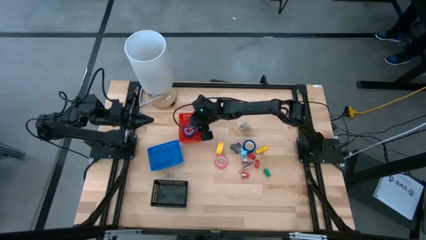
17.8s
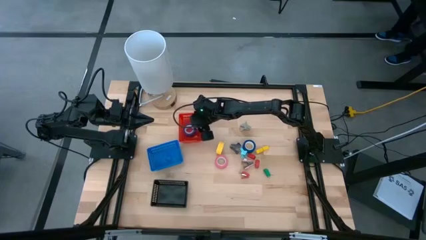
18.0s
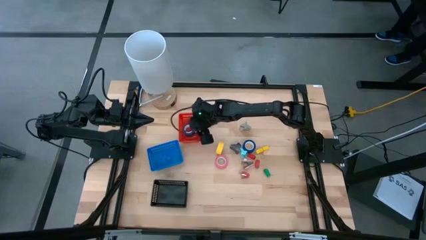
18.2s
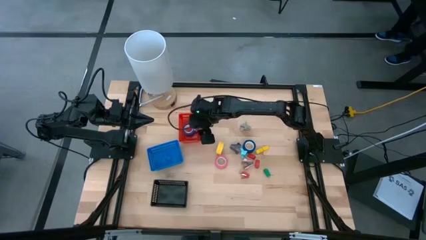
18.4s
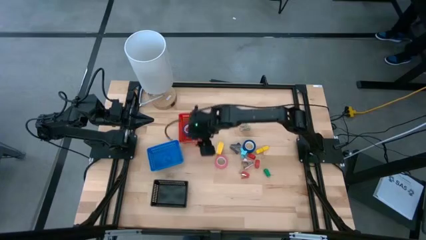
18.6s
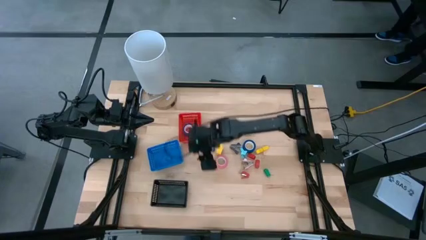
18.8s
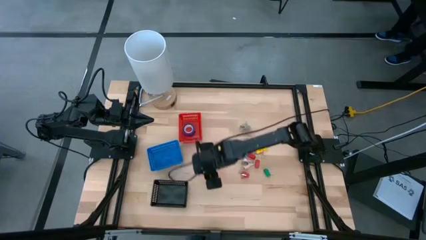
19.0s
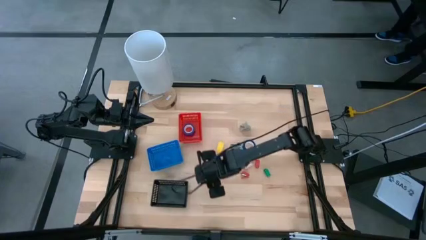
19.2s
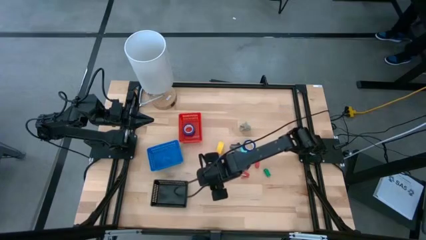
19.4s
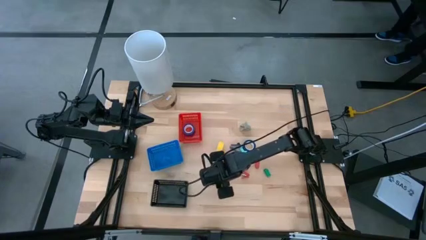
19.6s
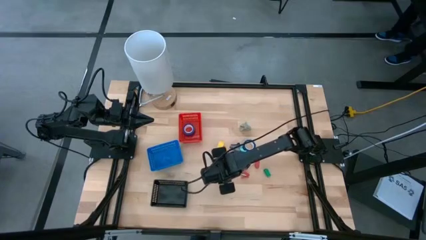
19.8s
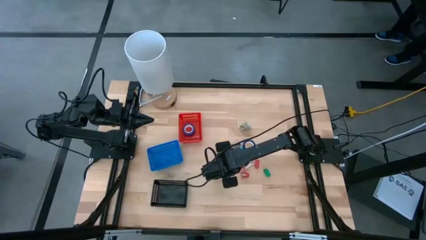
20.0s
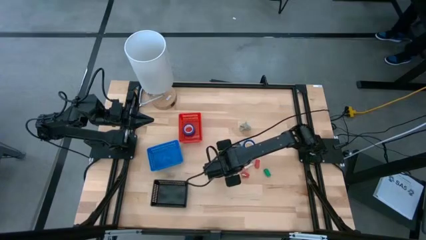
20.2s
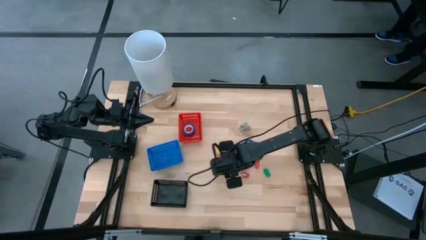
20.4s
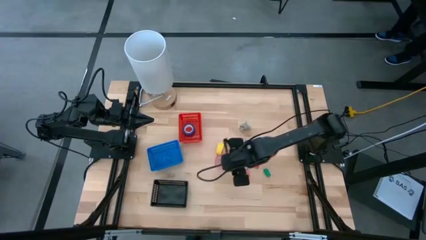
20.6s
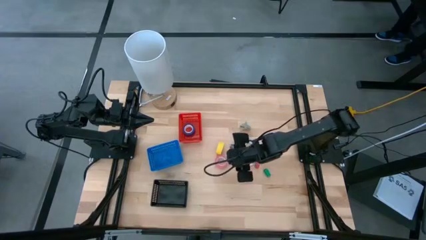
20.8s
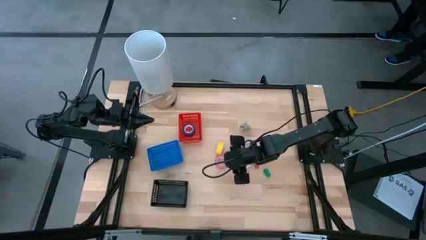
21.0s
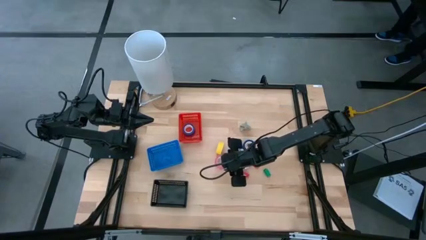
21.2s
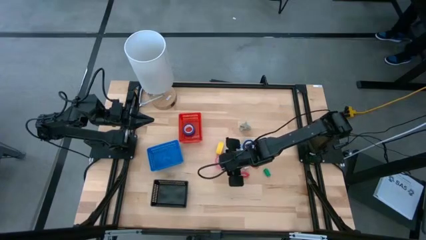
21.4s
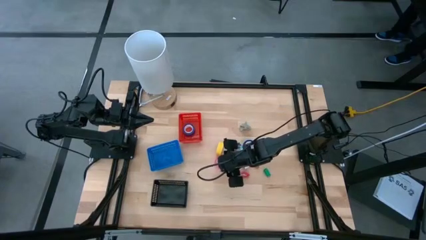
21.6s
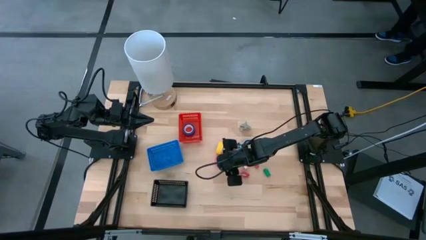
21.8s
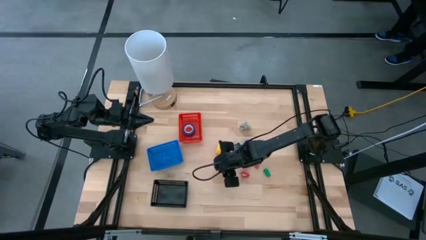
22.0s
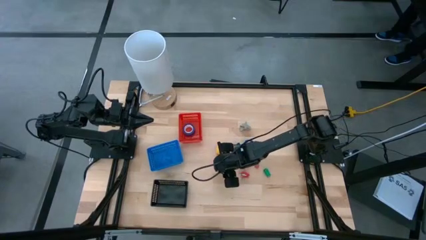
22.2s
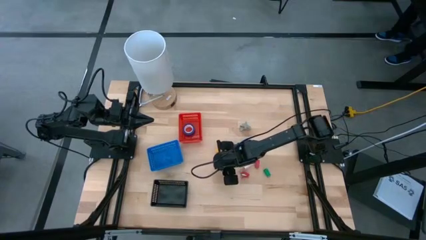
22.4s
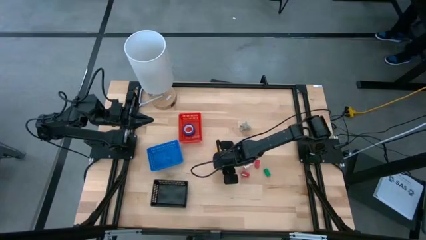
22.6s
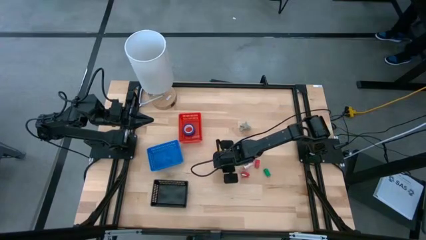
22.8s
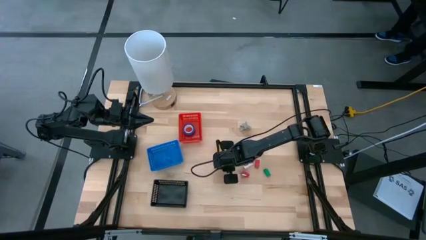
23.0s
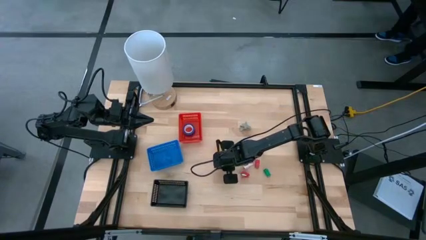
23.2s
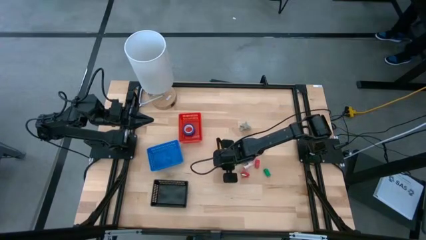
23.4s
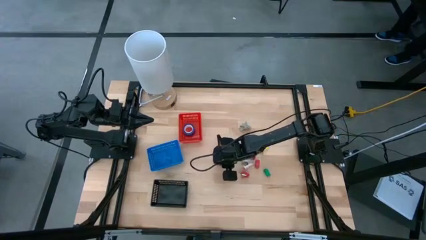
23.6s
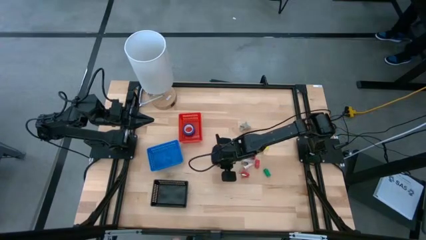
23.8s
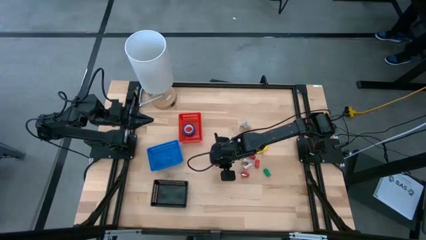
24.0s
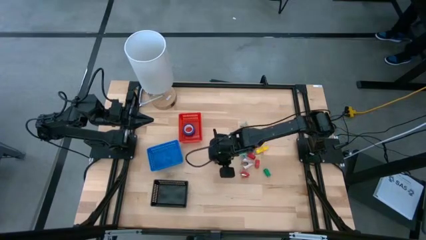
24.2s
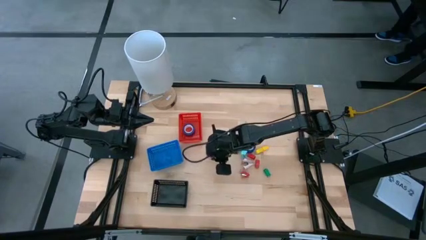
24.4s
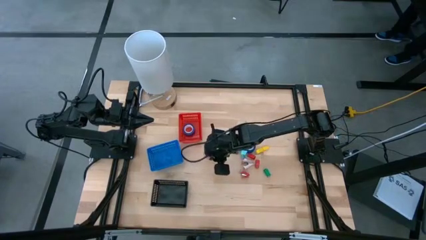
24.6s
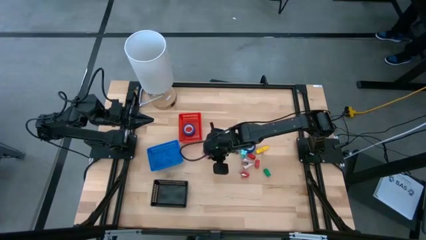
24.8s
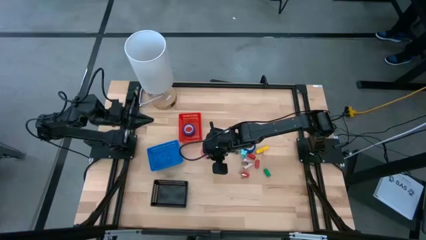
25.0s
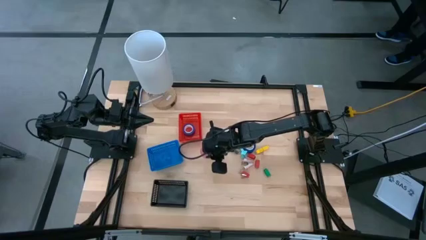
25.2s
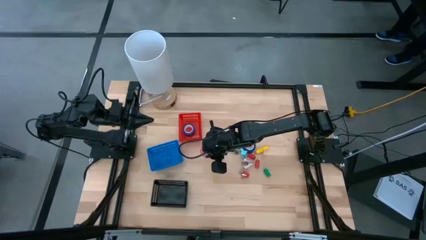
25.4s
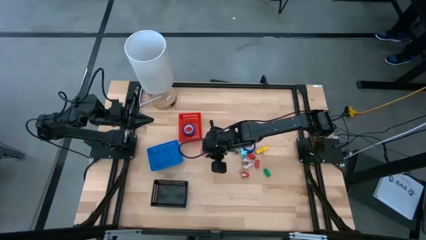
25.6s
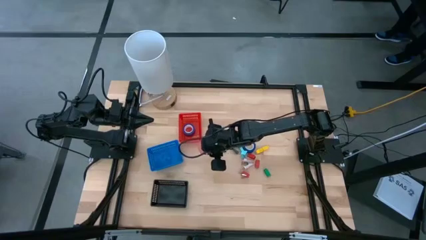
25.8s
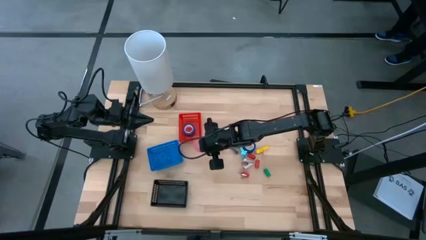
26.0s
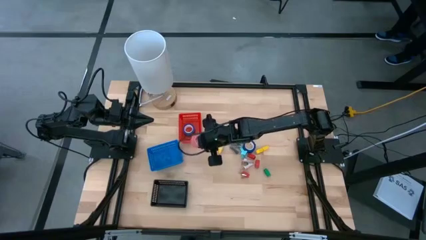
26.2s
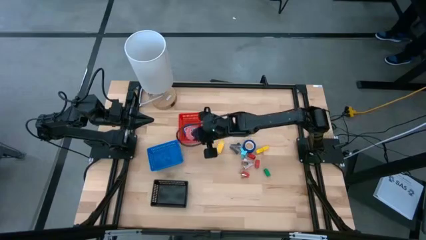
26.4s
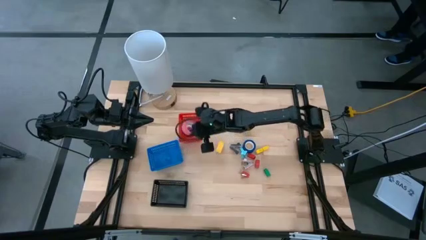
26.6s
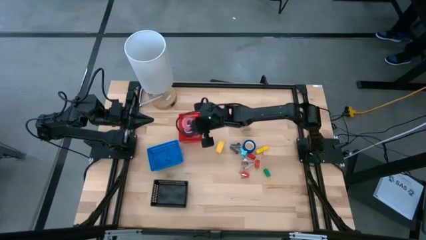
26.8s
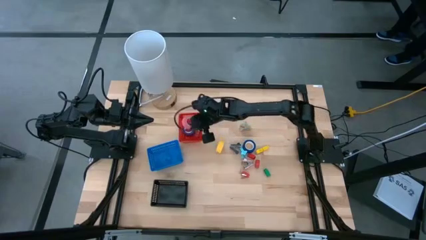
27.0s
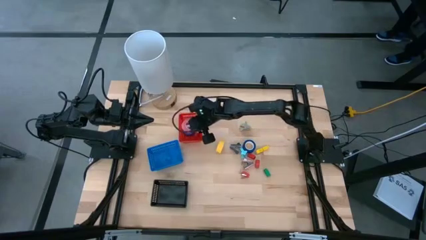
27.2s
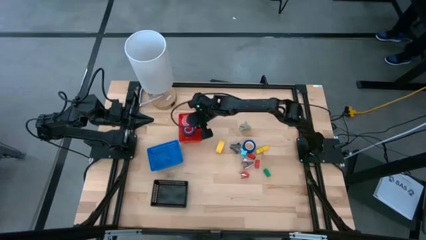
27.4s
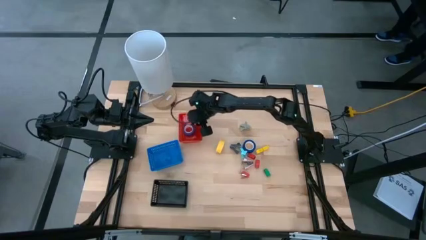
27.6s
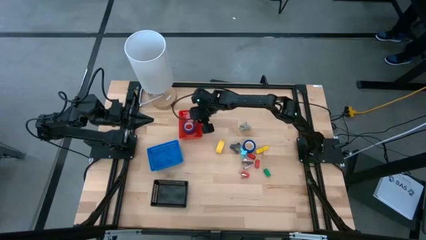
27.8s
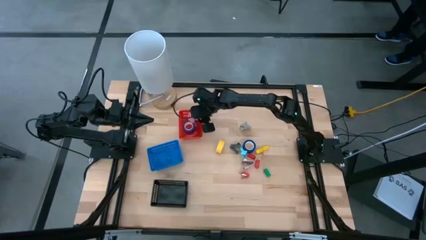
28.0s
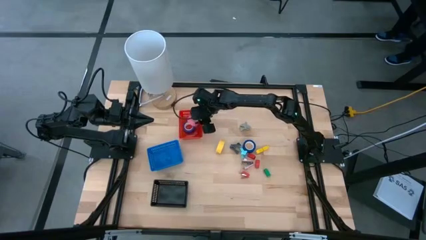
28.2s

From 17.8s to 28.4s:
Task: Pick and place Stapler, Stapler remover, tape
Put the pink tape into the red basket

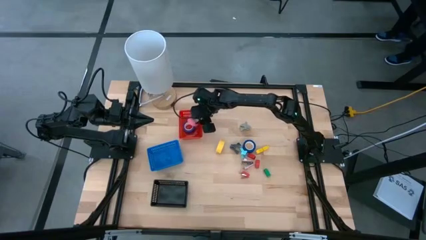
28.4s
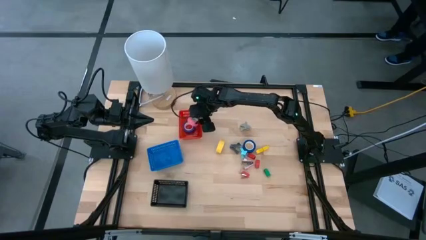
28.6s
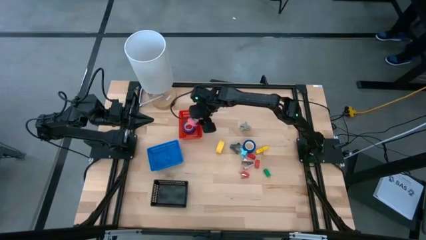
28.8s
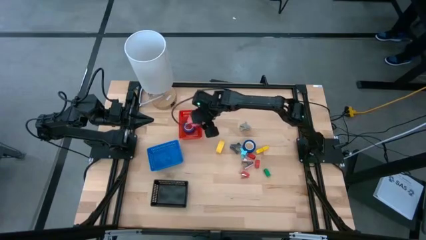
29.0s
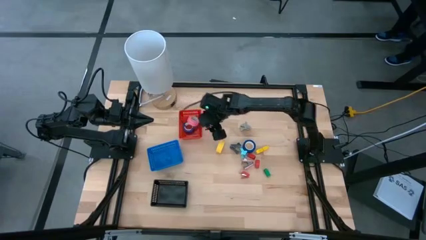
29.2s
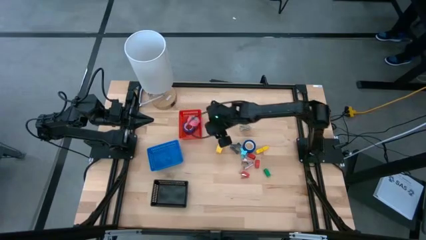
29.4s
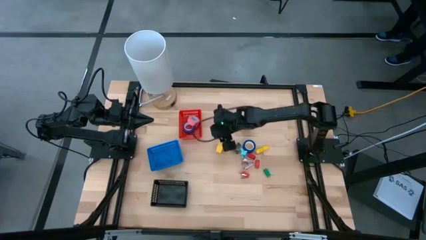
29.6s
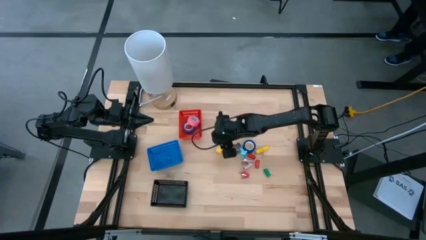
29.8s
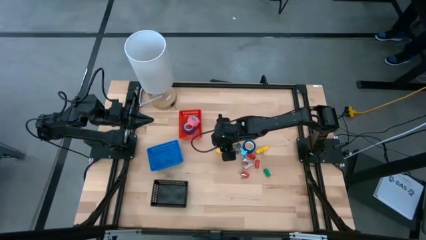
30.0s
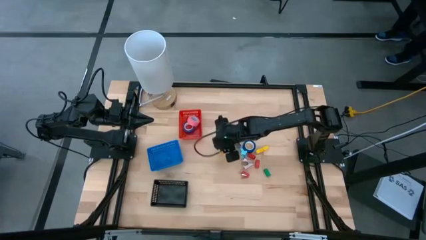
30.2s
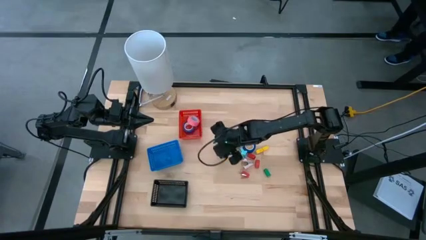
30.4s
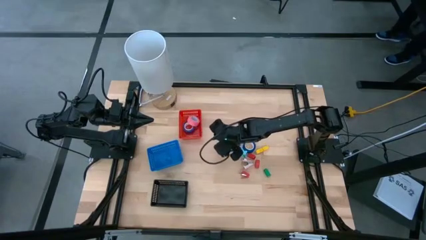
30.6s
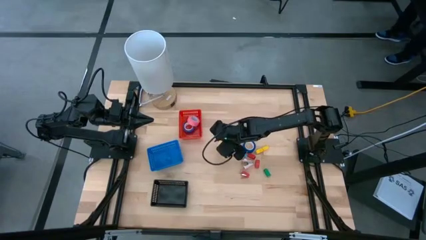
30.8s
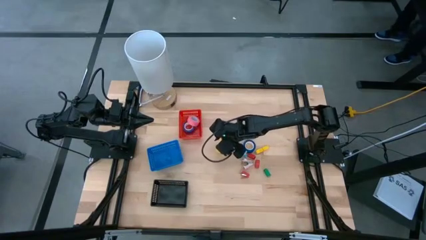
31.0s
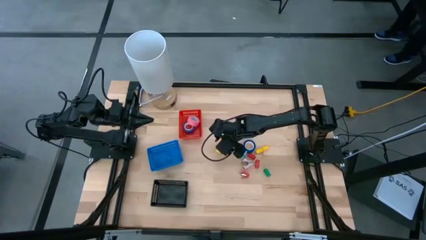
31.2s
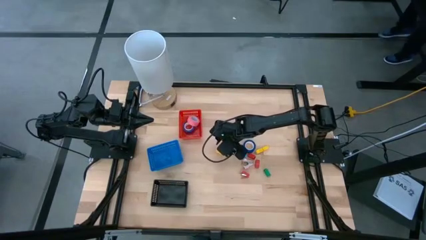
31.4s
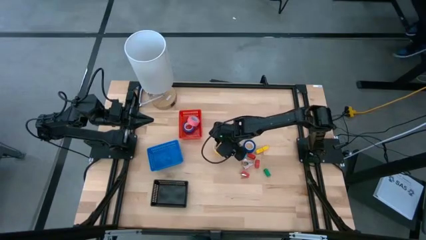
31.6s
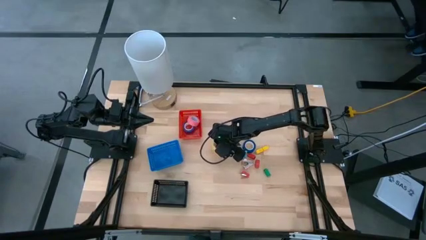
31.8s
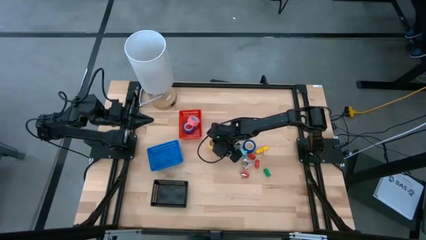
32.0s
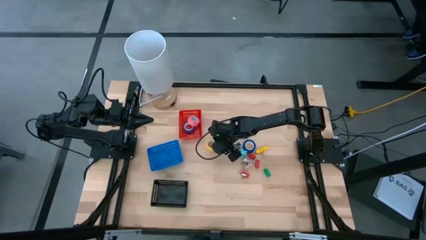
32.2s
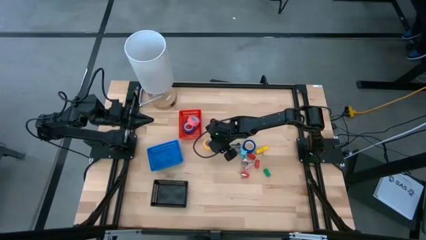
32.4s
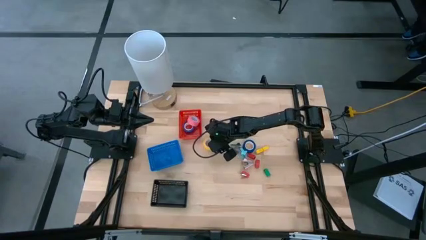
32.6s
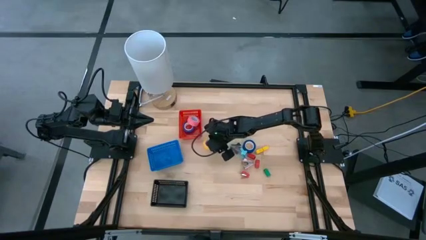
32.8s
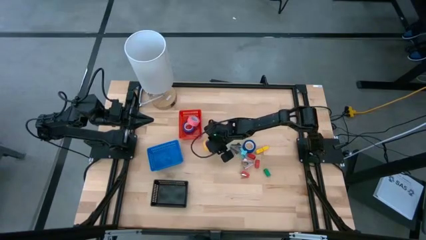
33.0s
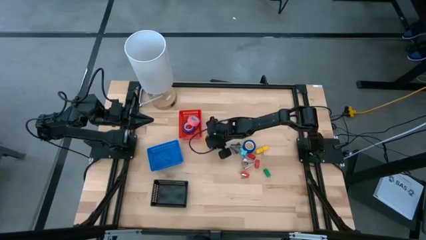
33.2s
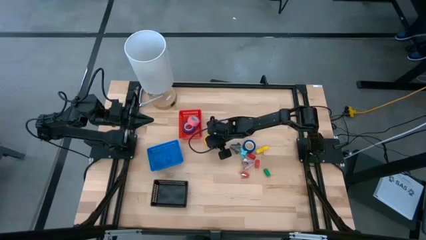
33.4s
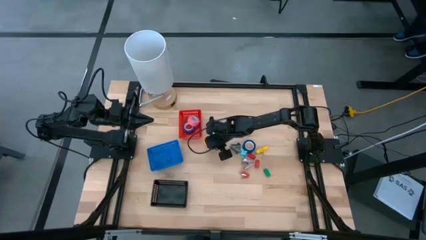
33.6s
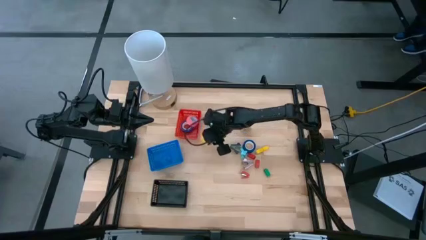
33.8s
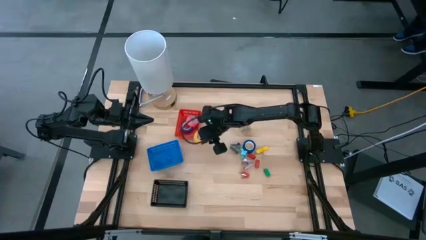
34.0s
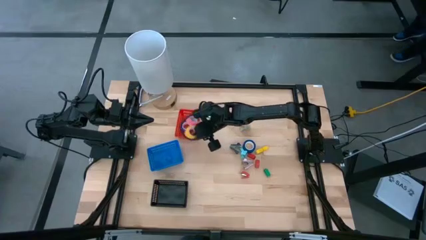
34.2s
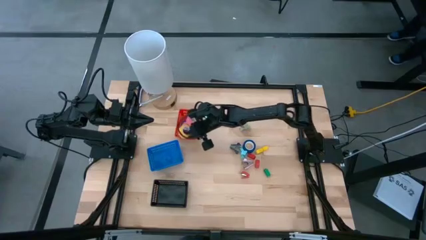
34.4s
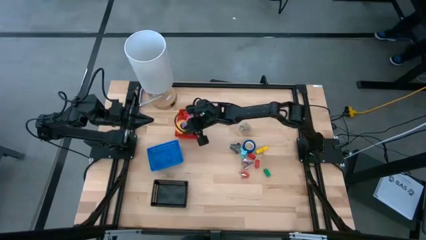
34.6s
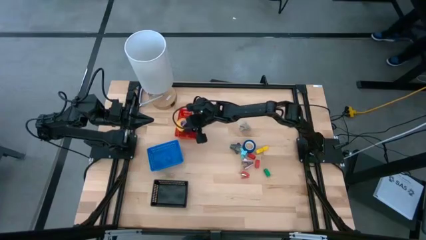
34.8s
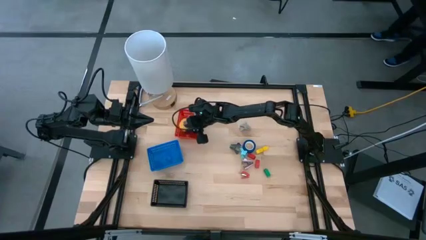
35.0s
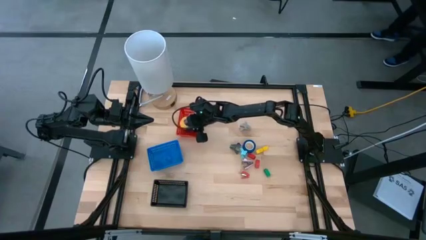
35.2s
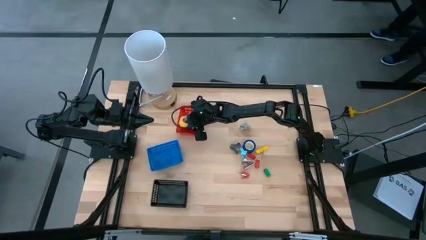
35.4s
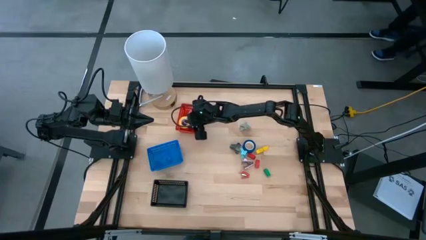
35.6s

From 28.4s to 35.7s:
Put the yellow tape into the red basket
